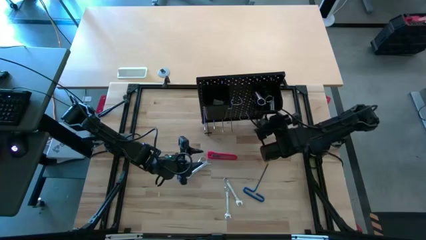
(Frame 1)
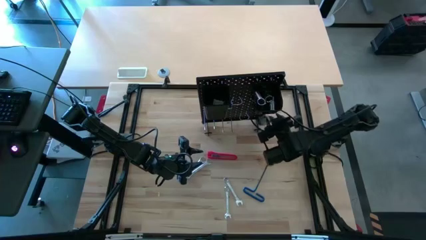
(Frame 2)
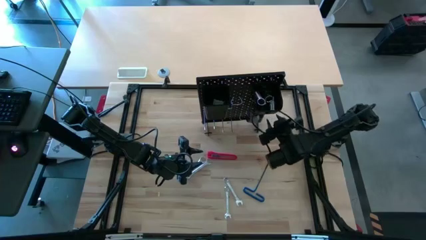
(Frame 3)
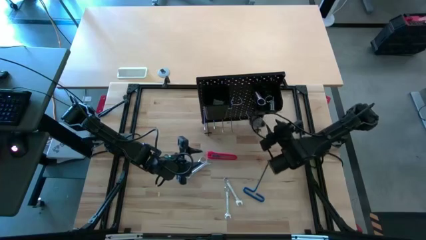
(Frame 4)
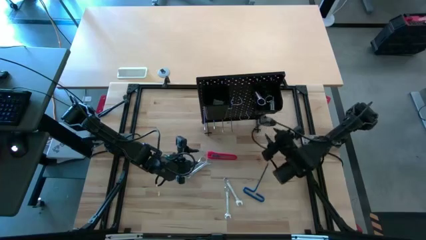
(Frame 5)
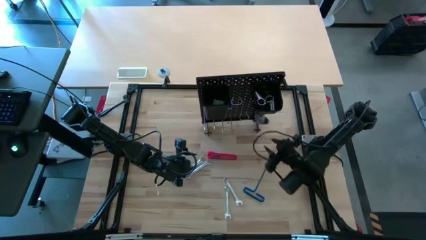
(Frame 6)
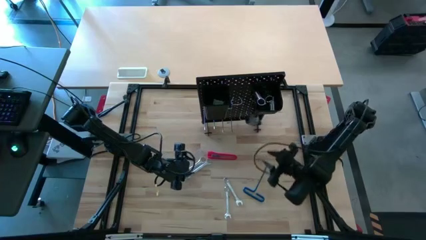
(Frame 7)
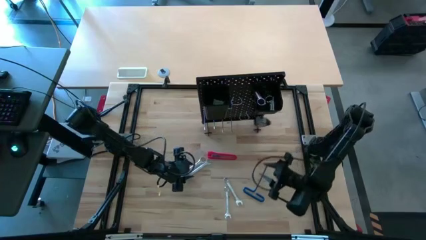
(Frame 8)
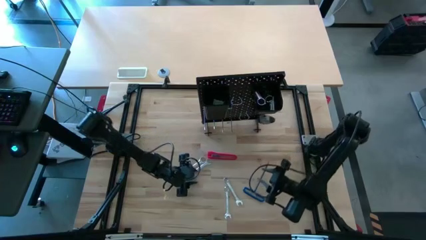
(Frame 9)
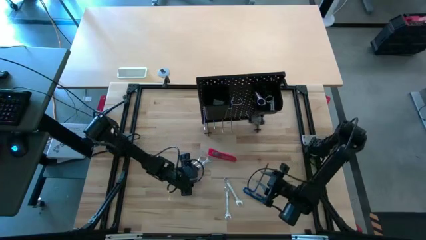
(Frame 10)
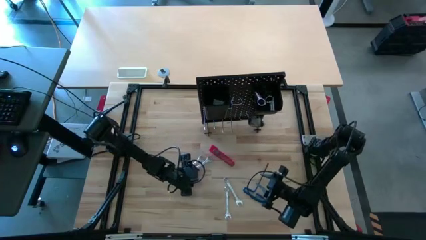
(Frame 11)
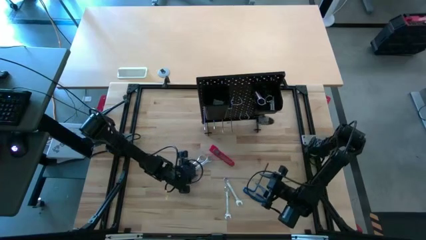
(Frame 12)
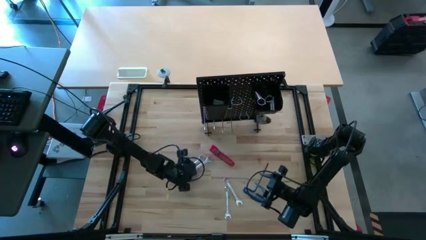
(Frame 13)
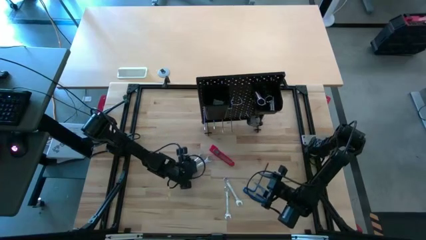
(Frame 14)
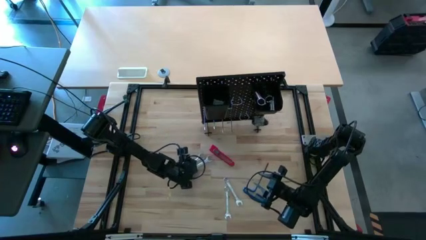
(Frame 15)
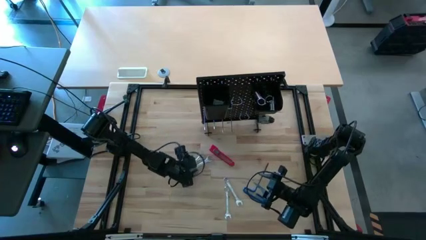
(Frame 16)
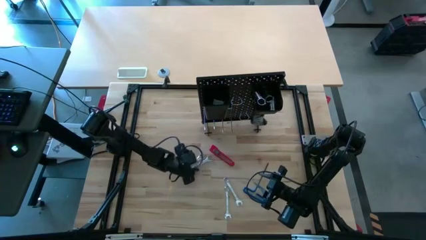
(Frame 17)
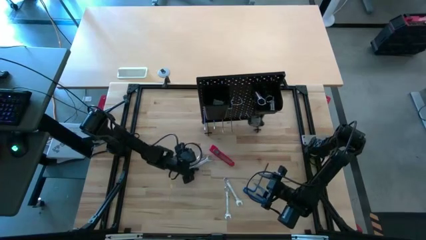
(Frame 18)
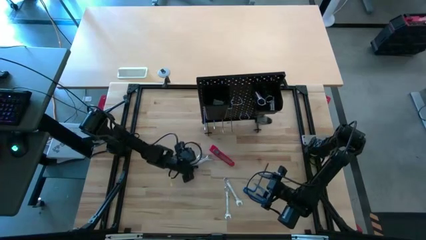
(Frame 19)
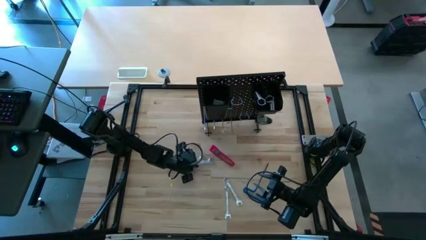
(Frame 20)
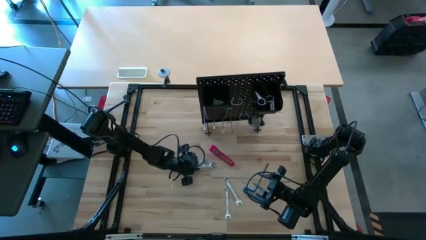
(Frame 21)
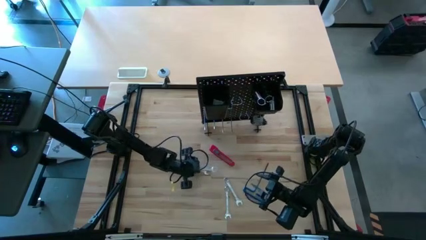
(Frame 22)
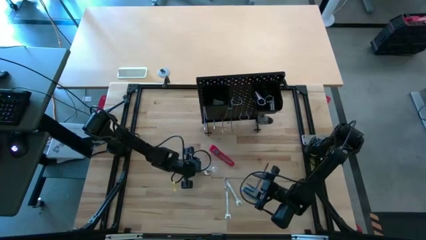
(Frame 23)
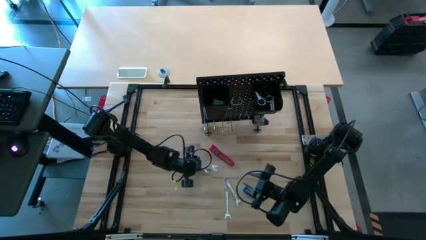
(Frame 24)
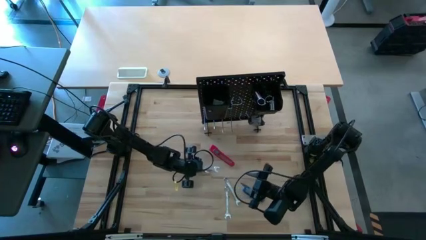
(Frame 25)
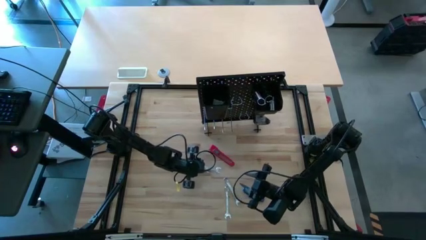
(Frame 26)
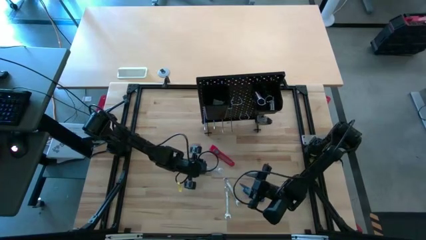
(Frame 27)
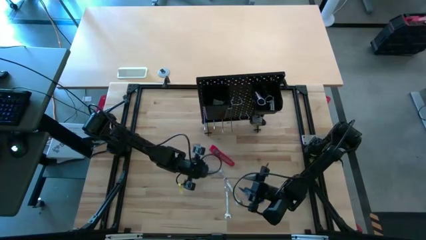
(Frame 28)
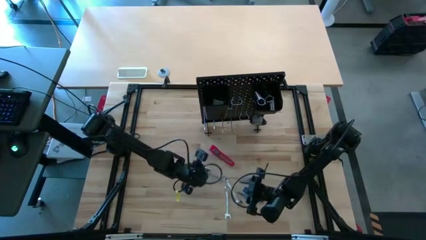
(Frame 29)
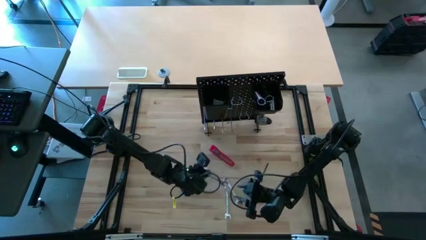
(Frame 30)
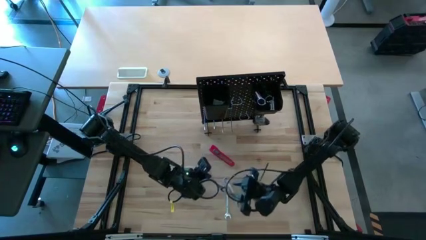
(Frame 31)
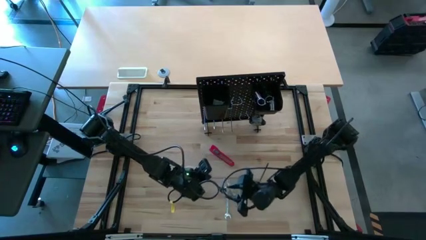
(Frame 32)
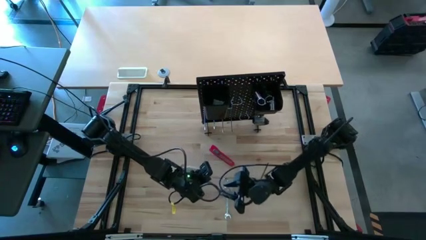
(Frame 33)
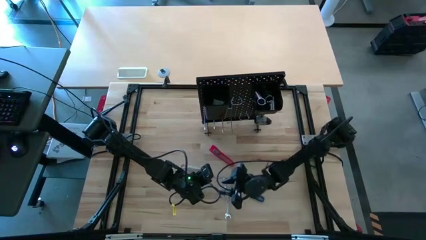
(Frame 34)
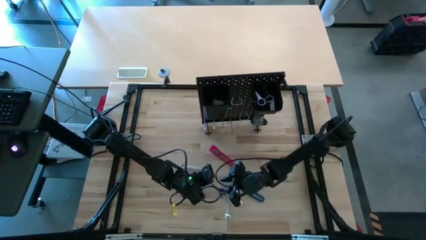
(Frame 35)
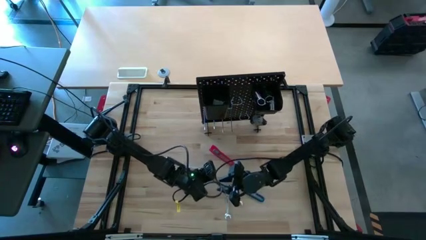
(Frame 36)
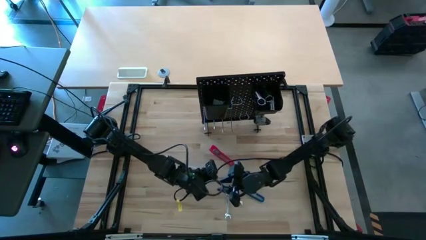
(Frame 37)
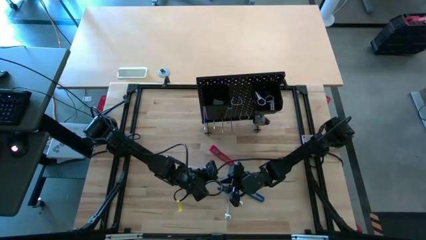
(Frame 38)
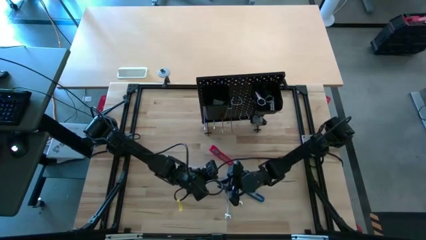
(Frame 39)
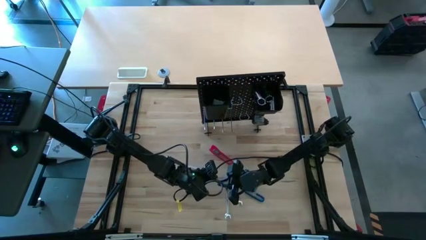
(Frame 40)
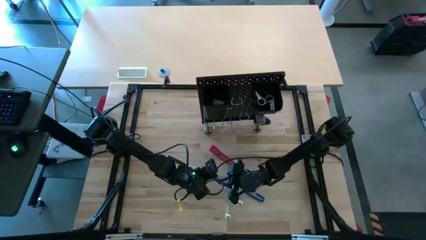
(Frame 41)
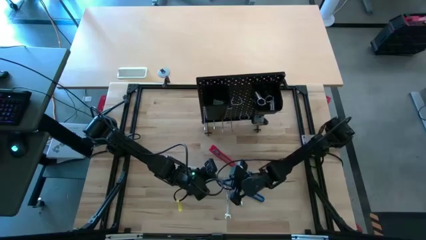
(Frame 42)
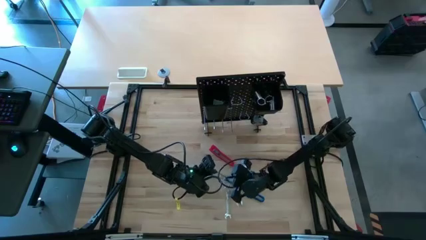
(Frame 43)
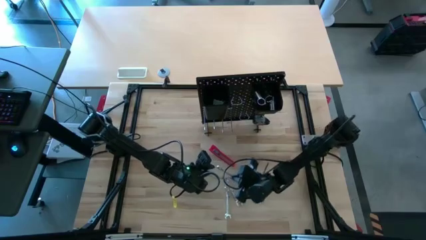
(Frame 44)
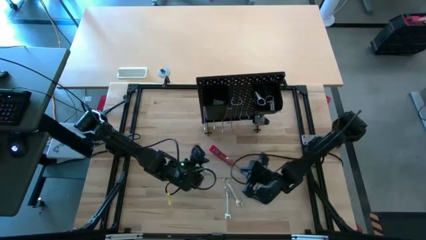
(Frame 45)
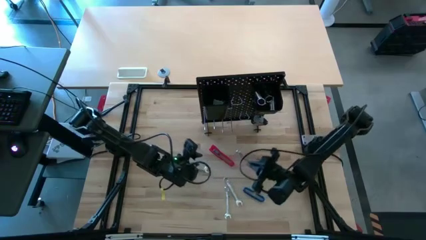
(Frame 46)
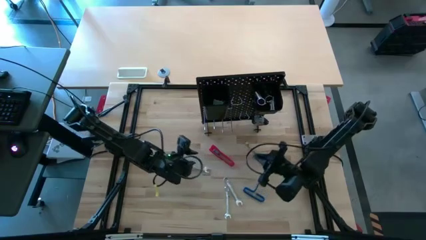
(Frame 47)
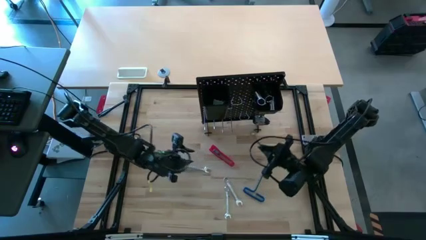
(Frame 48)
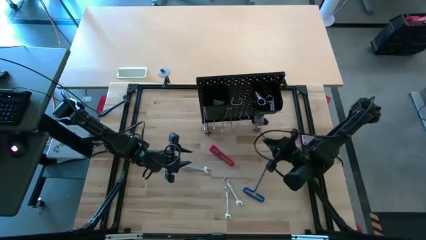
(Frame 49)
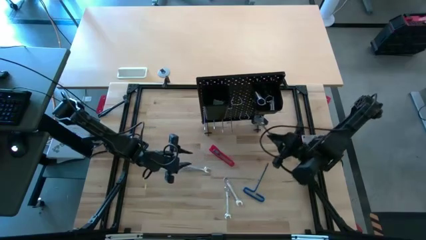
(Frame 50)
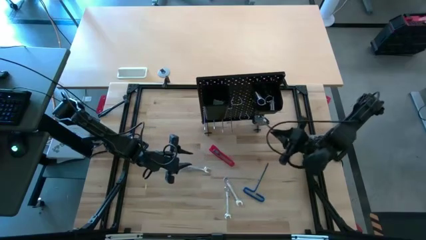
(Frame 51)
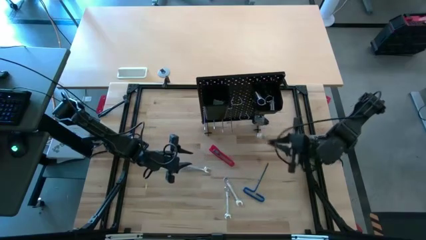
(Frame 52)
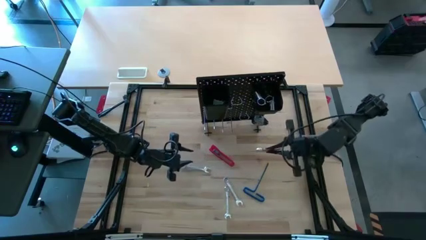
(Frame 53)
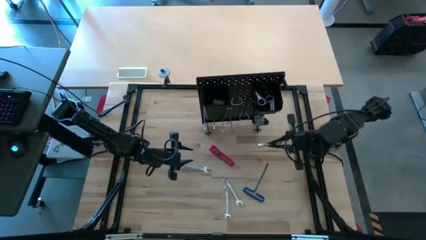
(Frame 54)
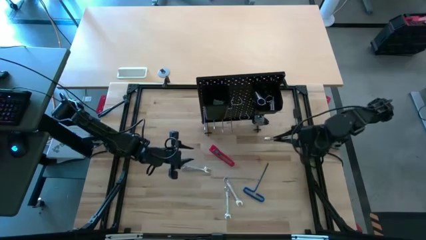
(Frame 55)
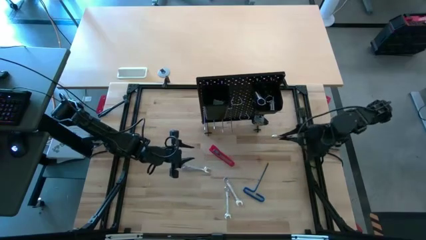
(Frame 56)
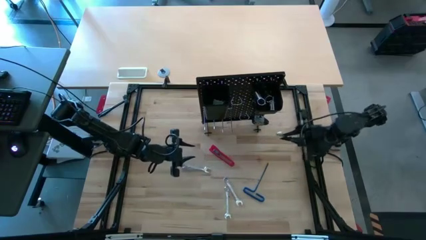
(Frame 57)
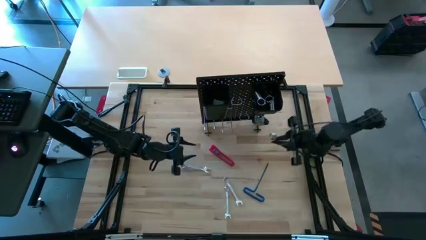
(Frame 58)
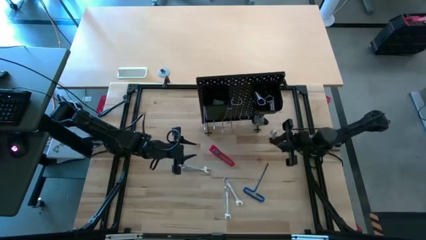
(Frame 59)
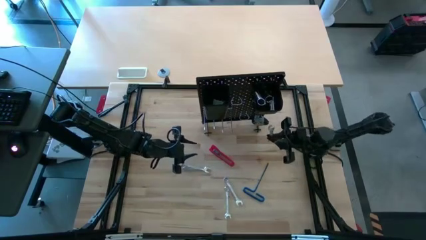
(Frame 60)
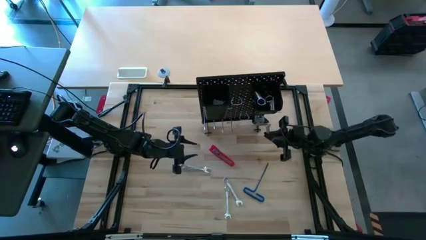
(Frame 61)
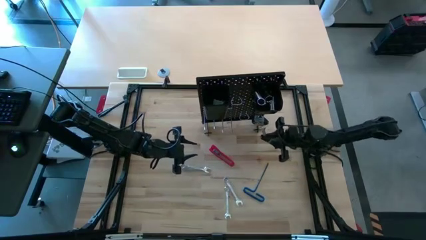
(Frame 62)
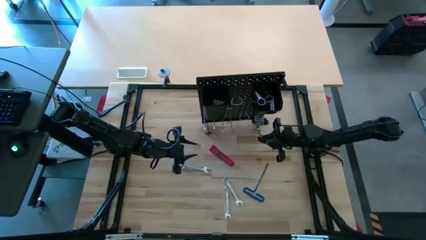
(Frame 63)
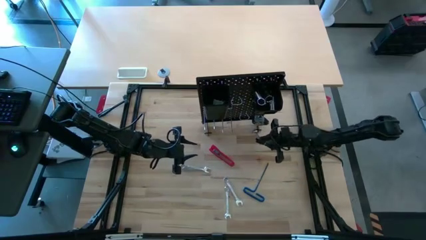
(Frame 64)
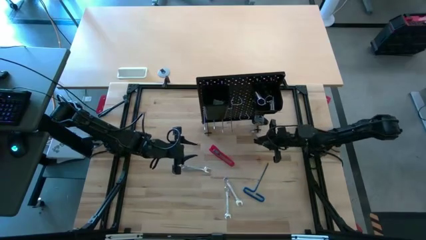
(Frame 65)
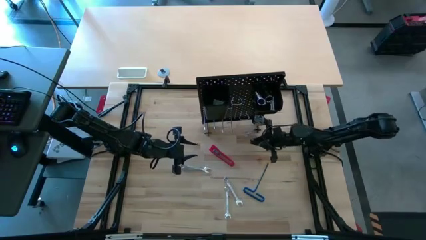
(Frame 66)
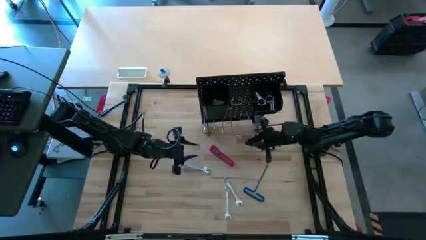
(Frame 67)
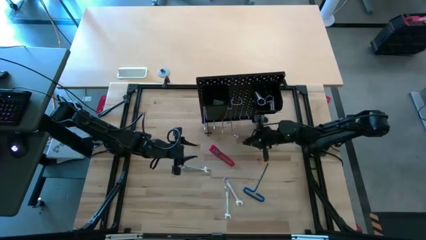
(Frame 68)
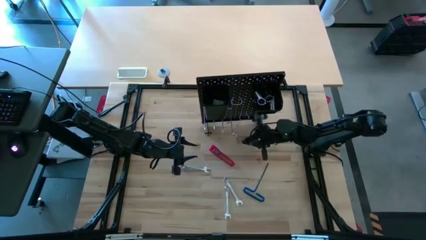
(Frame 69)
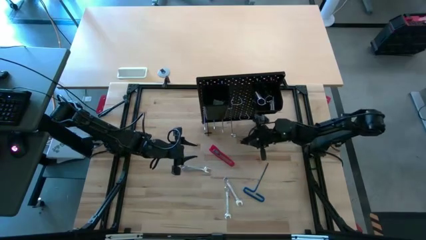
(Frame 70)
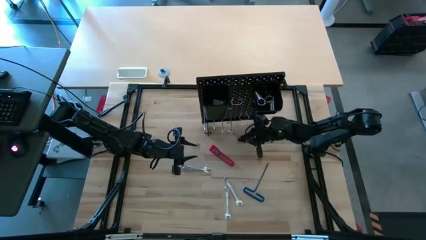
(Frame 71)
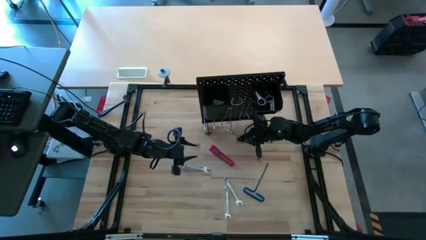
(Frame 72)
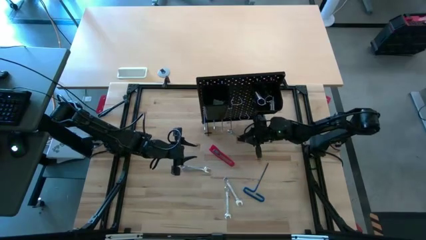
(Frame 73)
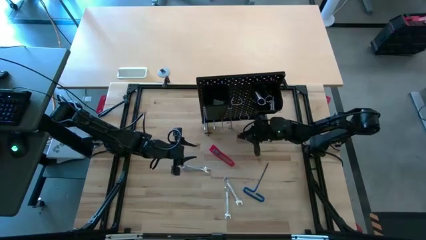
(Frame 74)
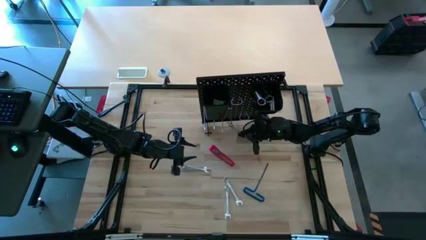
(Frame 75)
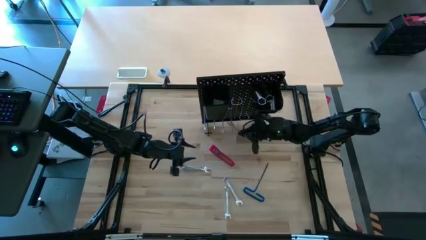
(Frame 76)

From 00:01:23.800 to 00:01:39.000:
Task: Hang tools onto peg board
Hang the wrench on the peg board
